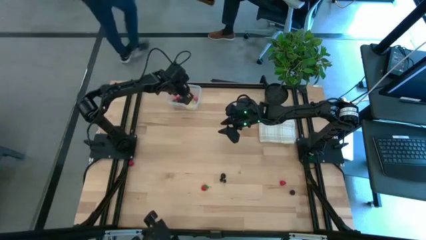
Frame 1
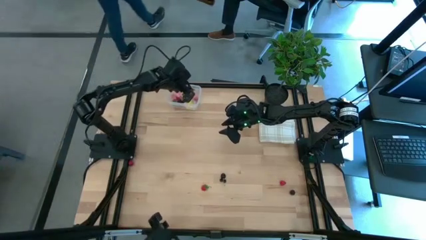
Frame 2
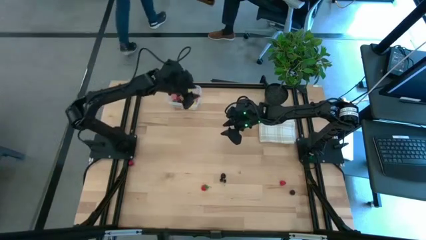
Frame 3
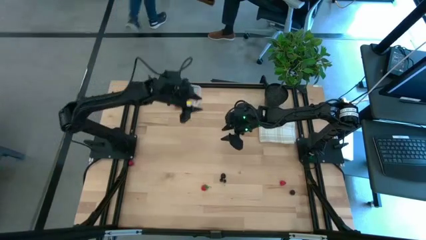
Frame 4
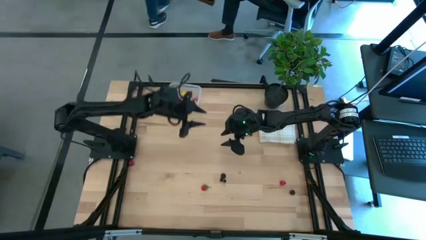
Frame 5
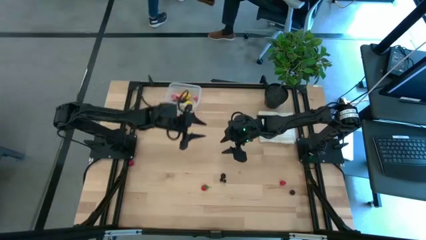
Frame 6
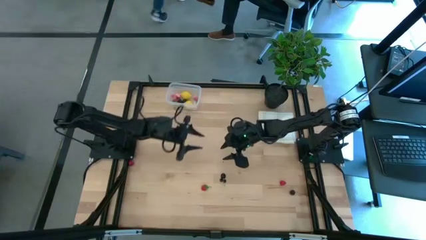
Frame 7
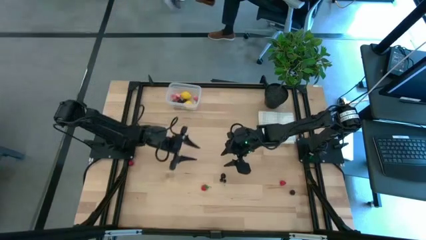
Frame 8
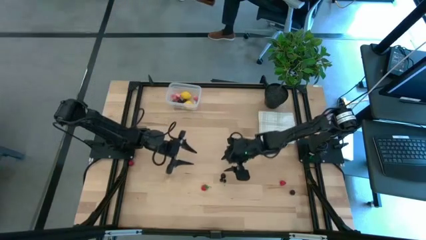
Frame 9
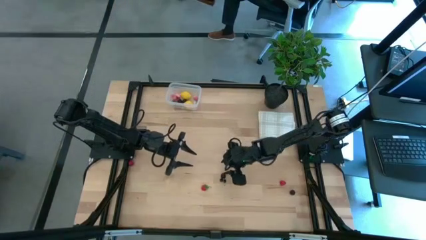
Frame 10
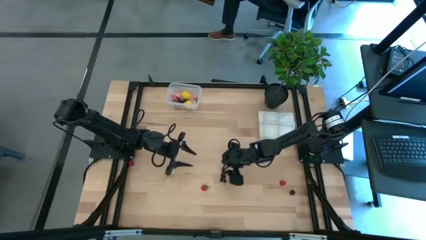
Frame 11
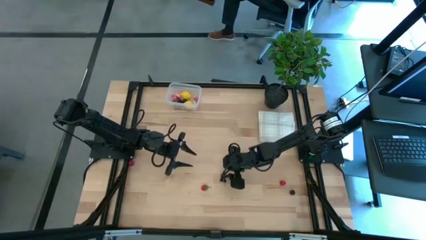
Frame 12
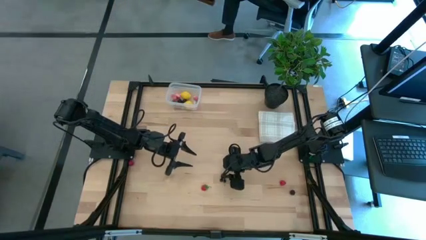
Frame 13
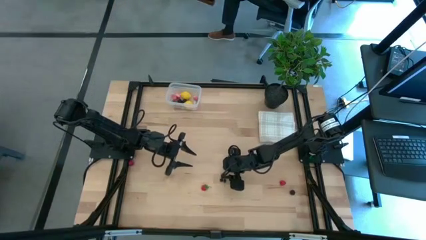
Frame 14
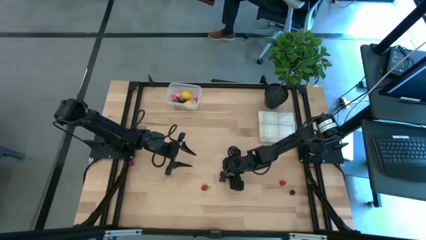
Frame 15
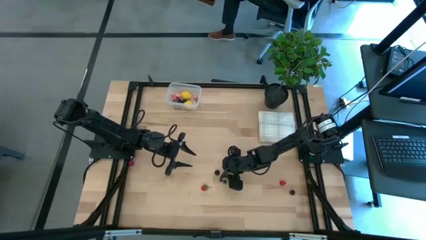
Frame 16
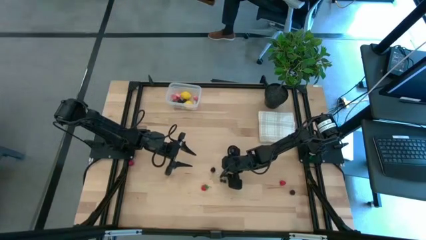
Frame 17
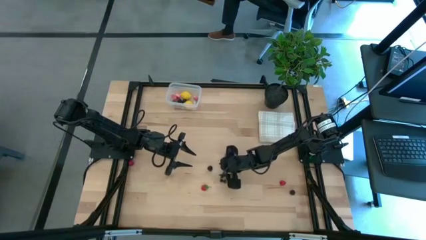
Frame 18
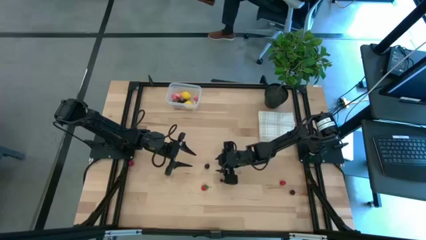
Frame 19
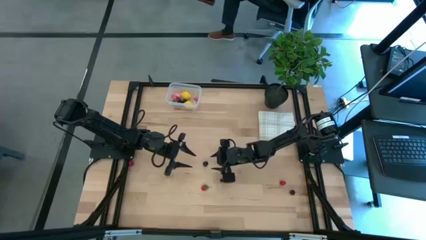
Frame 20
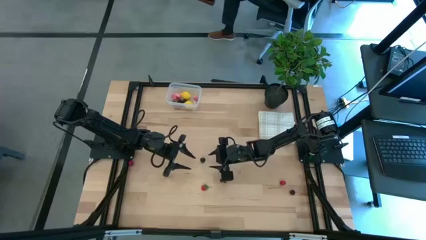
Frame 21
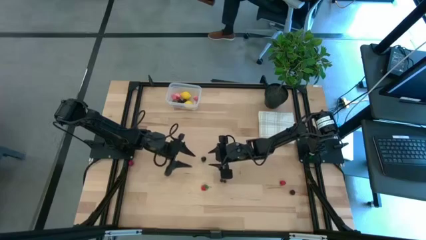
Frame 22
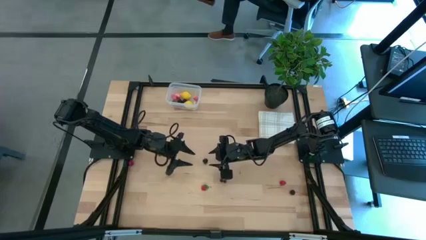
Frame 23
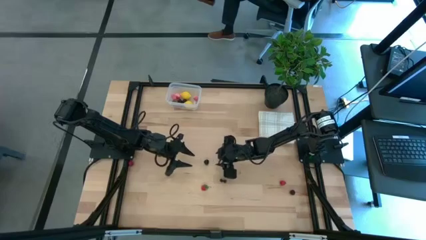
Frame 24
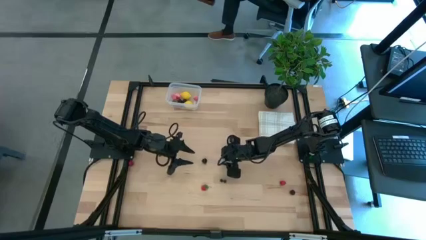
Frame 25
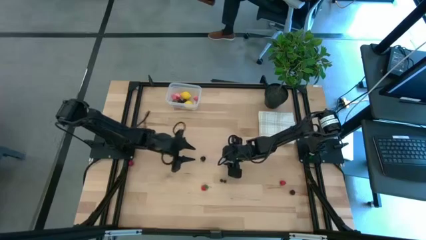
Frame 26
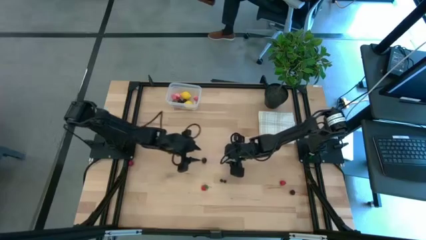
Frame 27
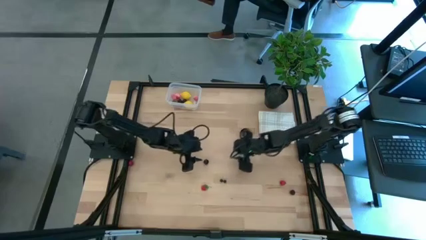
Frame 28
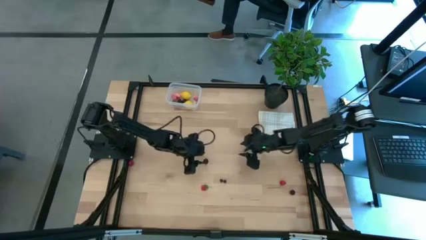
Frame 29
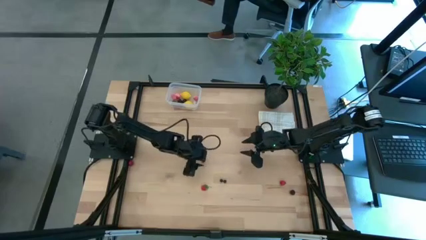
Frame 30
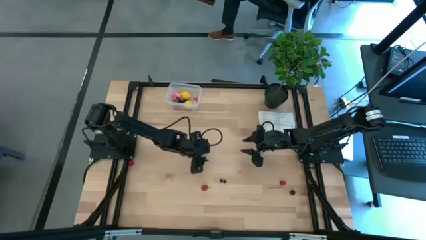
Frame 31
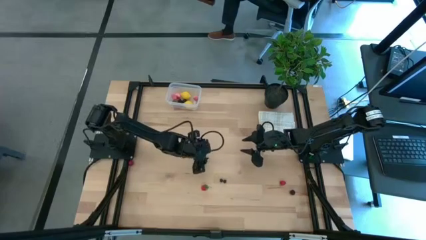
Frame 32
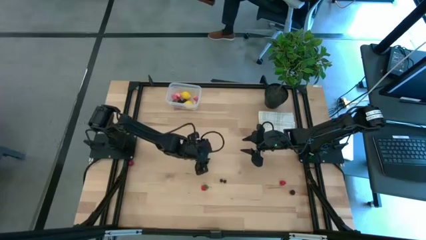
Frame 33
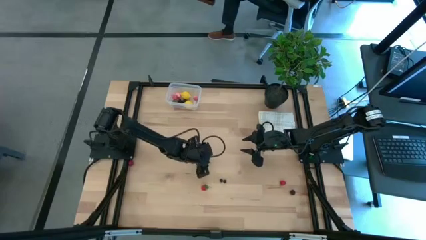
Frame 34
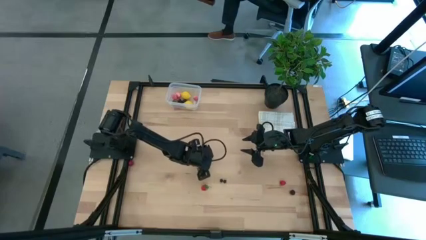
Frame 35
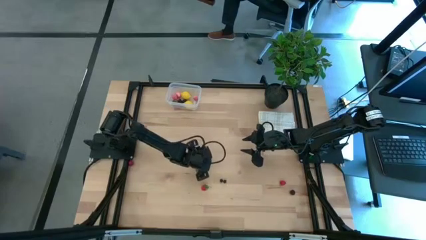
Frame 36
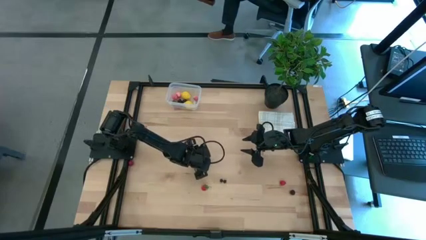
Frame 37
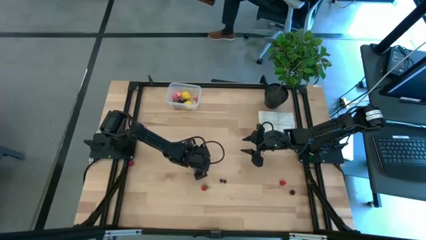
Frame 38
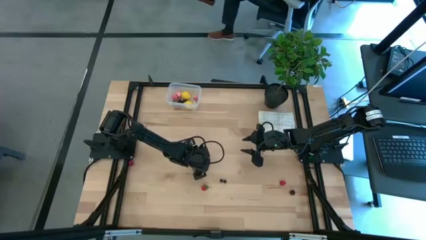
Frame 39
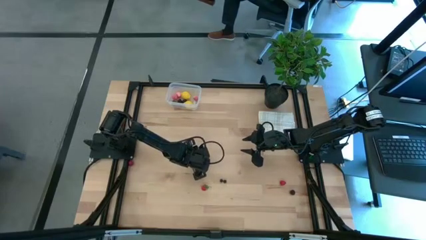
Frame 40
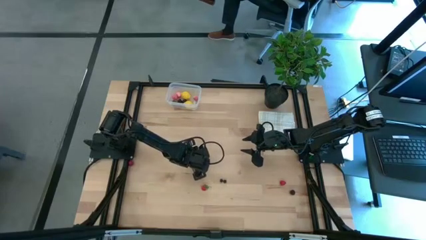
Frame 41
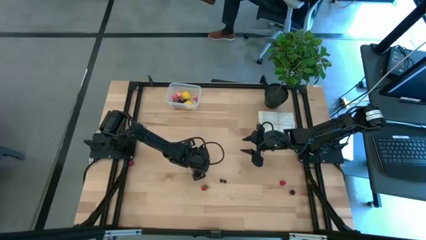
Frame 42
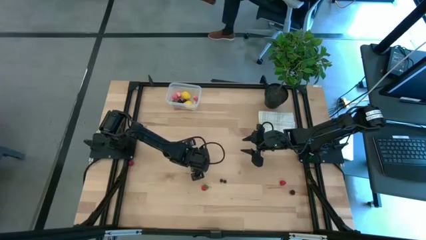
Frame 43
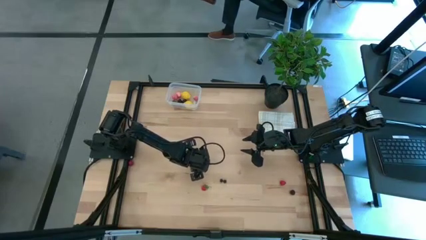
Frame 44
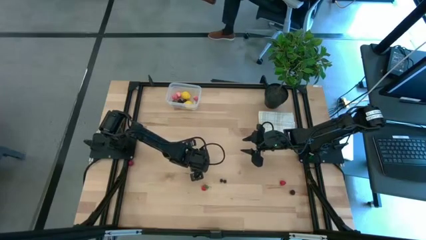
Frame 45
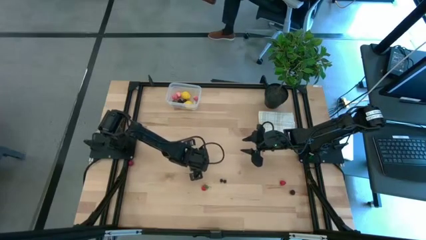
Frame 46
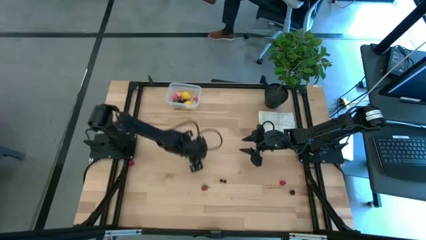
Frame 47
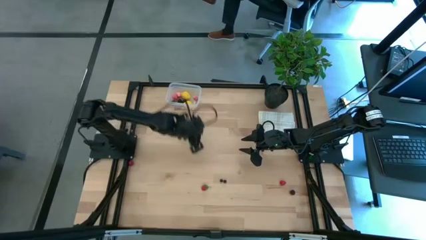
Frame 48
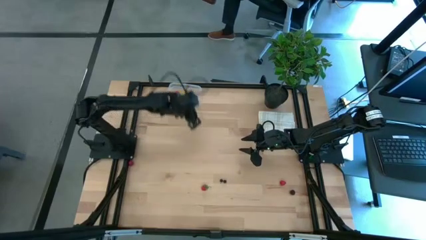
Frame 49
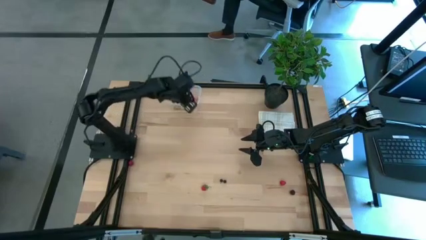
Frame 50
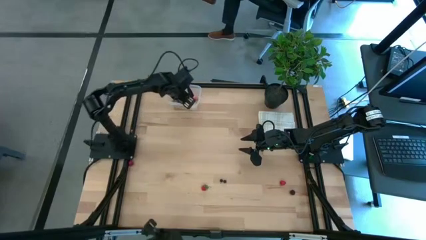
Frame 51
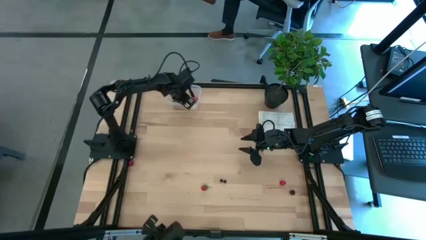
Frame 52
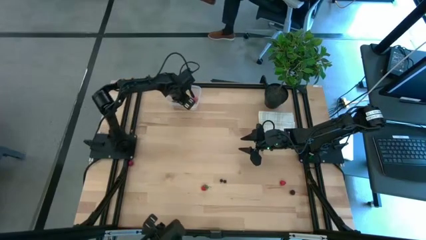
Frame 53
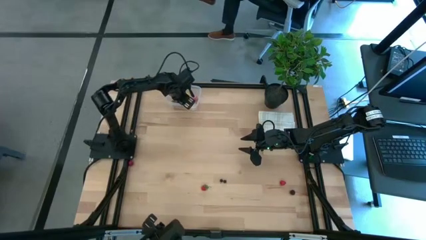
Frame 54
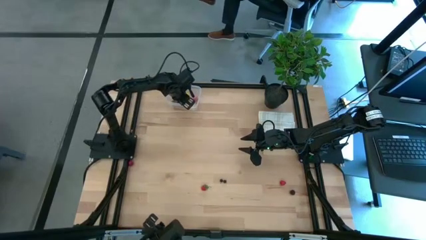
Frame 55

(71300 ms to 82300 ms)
Task: Pick and placing Produce into tupperware
Put the top black cherry into the transparent bin

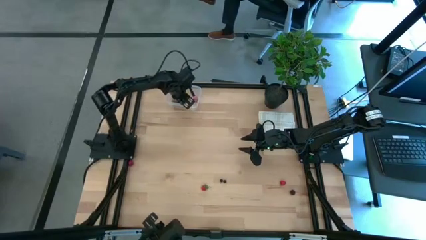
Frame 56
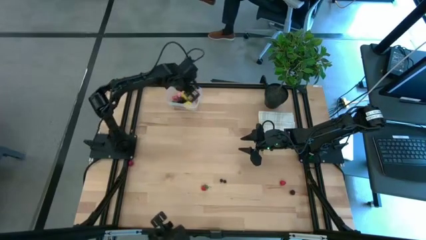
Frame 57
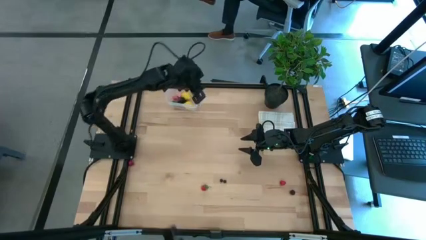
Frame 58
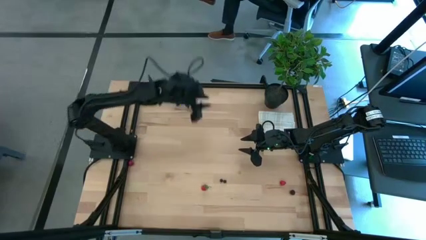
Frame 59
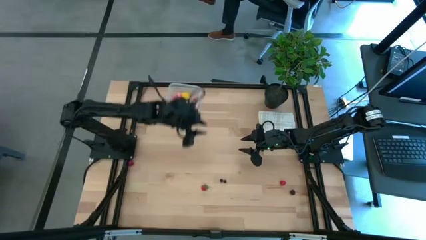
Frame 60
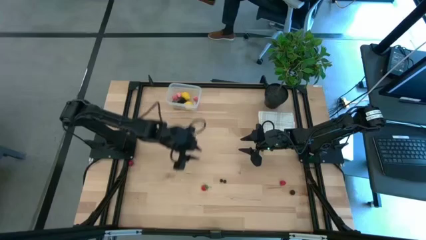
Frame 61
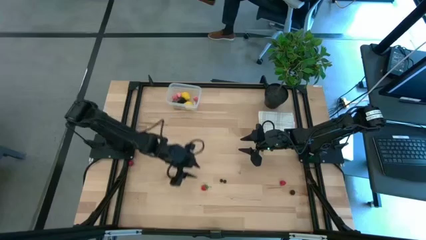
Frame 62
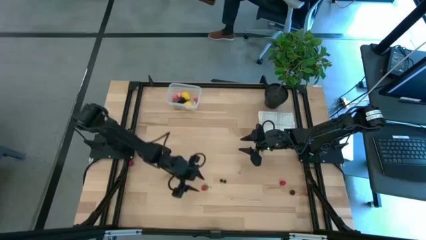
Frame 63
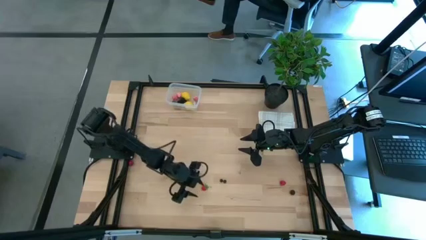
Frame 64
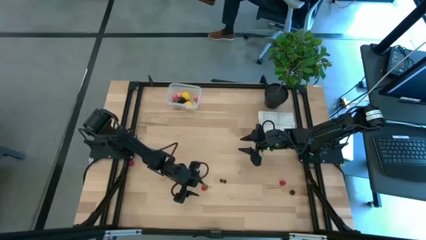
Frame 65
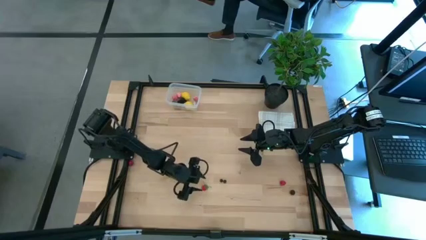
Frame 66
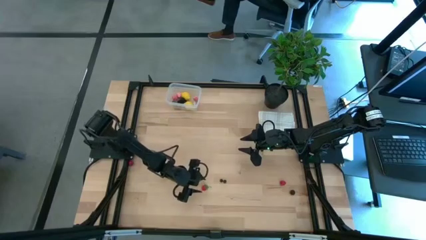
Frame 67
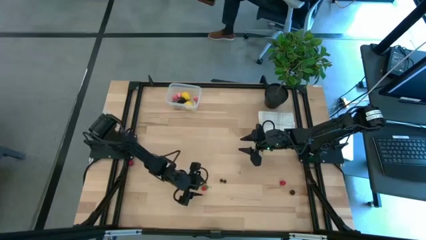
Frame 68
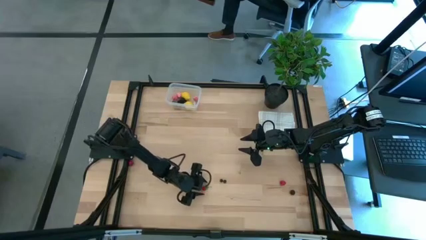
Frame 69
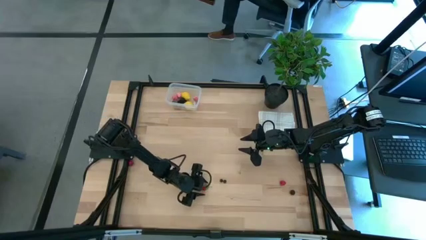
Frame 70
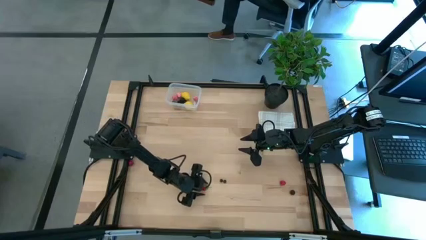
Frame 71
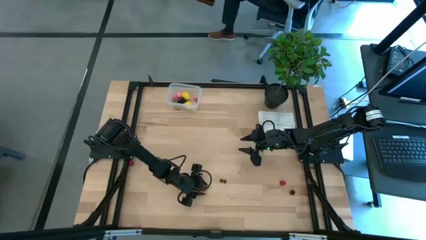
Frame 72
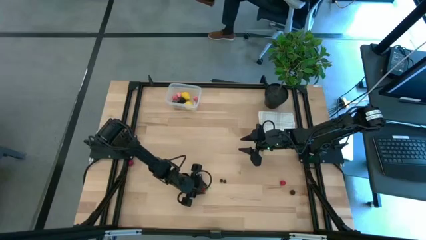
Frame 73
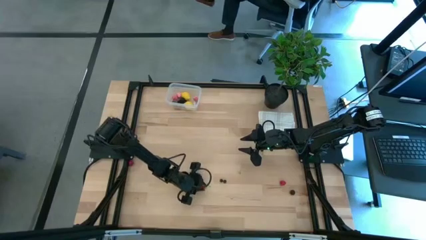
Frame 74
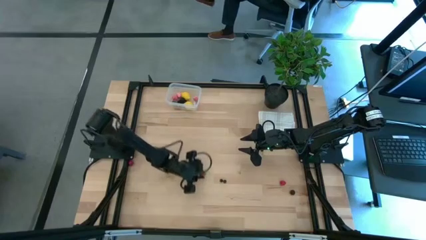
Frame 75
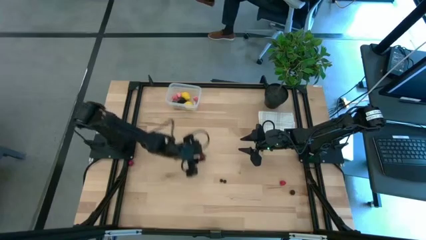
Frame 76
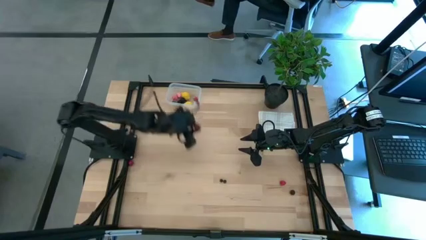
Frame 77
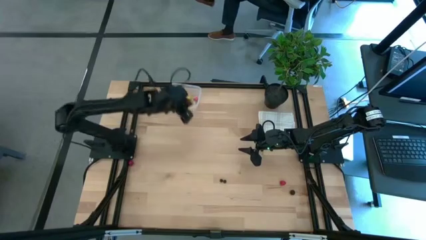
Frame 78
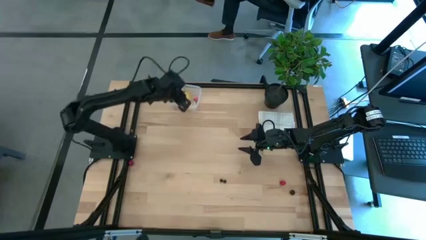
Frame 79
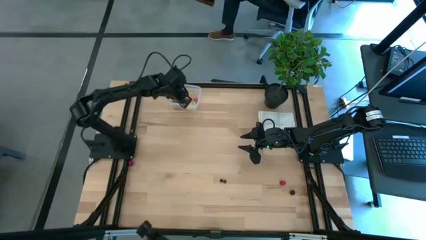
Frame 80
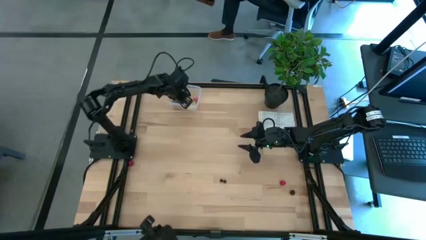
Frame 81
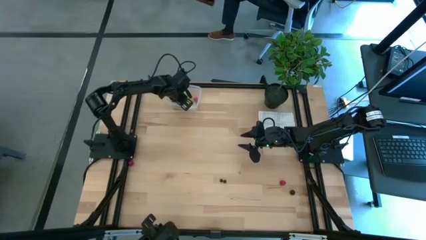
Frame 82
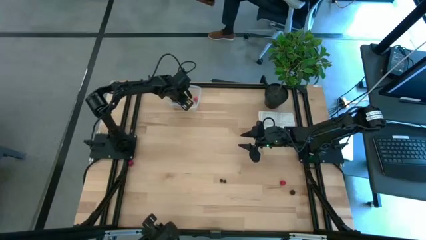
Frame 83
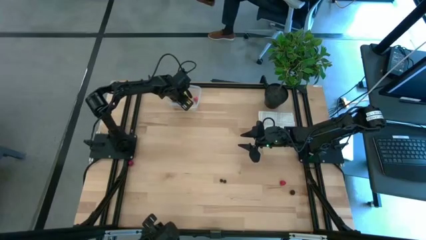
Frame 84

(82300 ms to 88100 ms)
Put the red strawberry into the transparent bin
